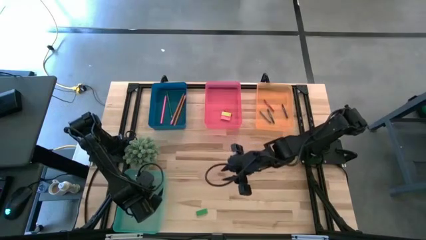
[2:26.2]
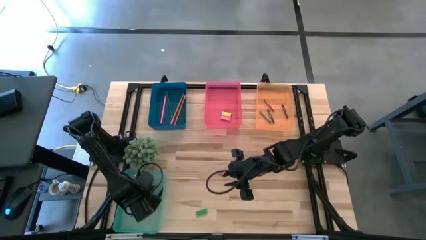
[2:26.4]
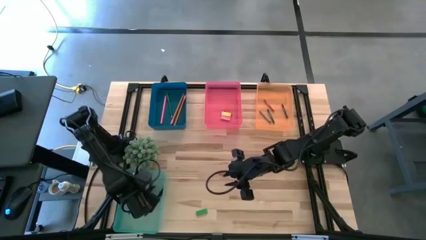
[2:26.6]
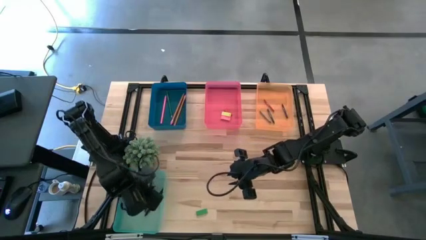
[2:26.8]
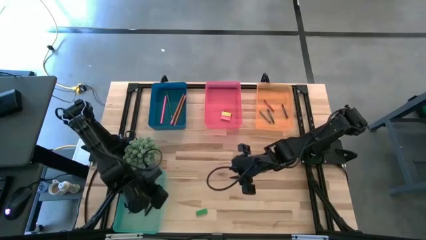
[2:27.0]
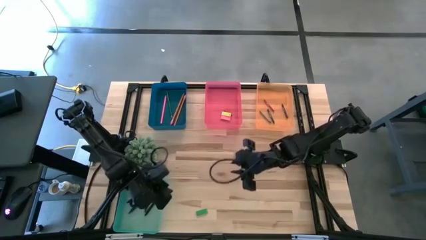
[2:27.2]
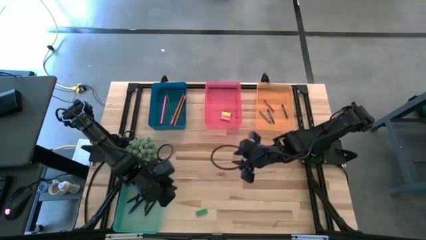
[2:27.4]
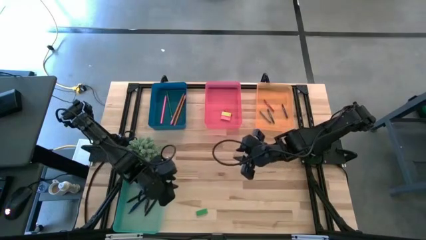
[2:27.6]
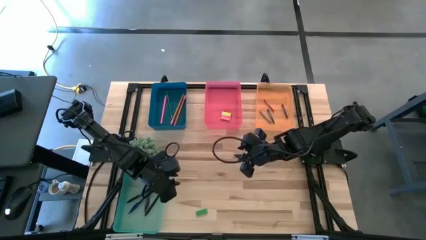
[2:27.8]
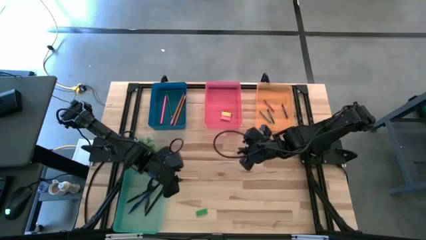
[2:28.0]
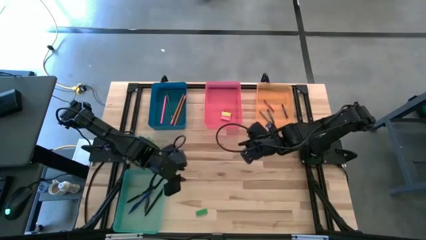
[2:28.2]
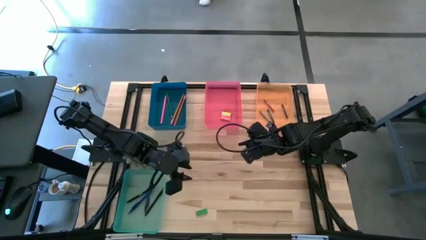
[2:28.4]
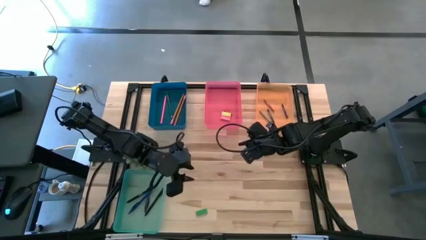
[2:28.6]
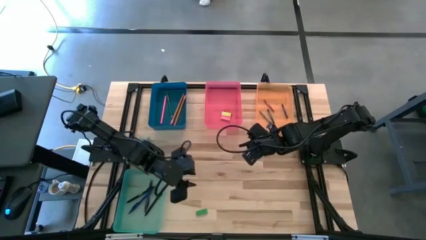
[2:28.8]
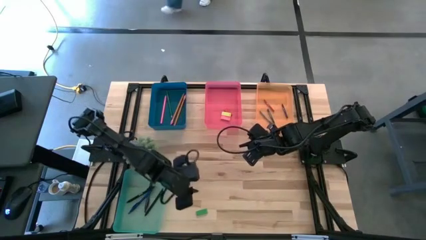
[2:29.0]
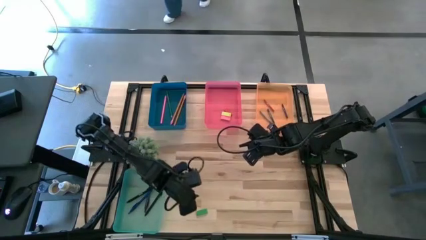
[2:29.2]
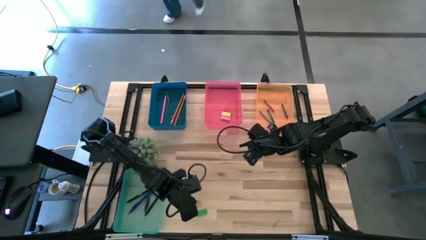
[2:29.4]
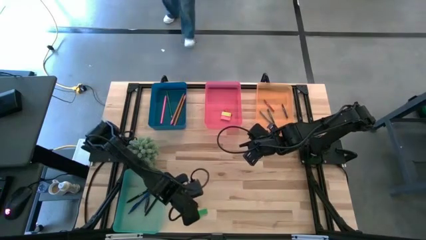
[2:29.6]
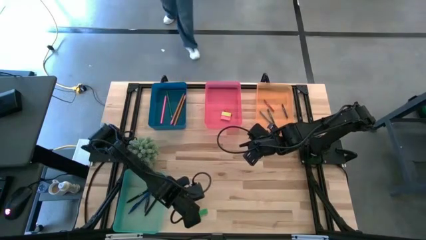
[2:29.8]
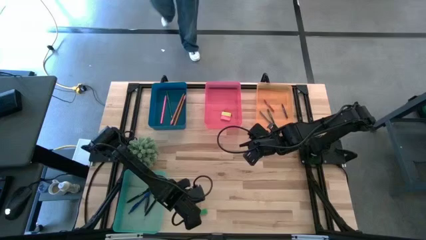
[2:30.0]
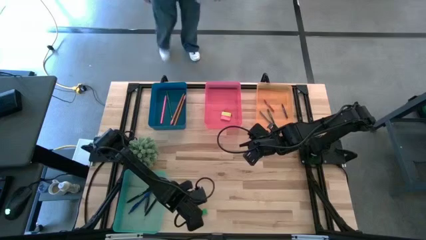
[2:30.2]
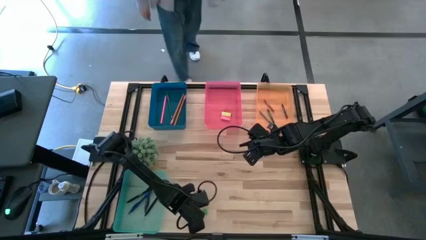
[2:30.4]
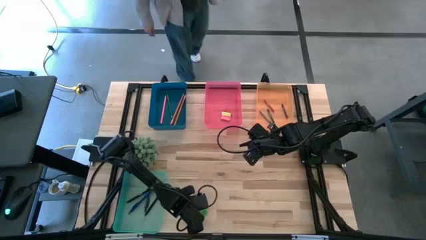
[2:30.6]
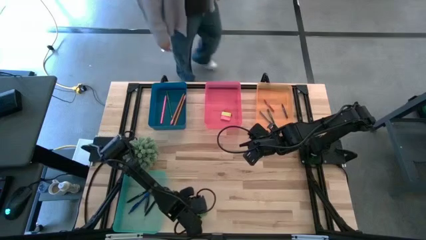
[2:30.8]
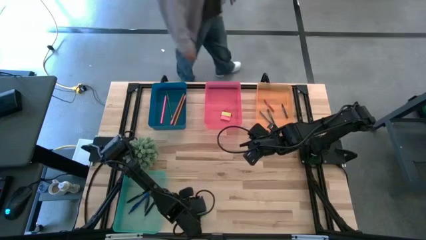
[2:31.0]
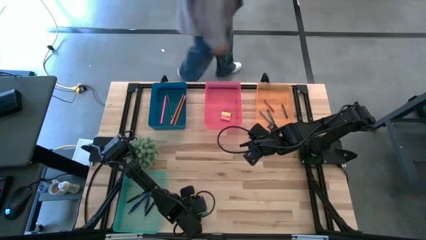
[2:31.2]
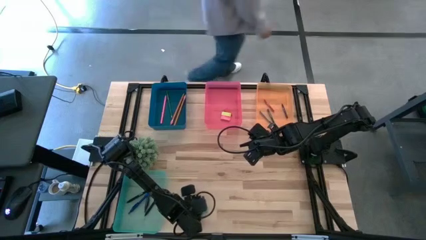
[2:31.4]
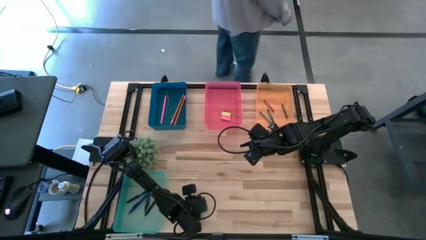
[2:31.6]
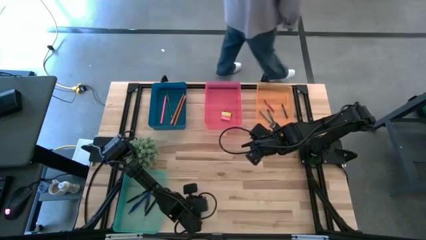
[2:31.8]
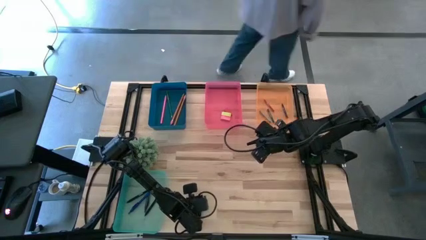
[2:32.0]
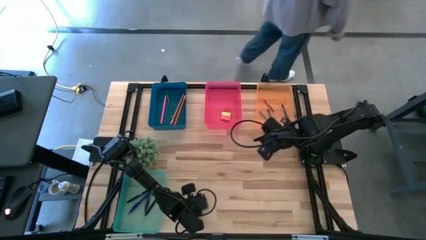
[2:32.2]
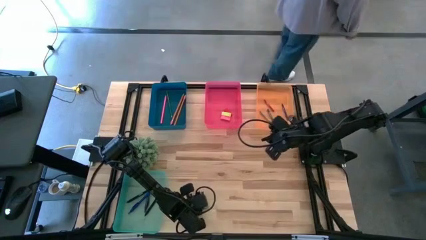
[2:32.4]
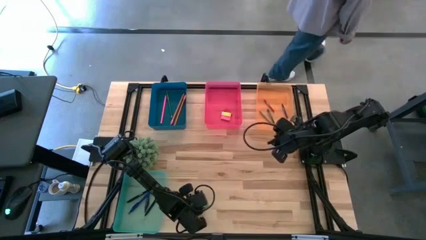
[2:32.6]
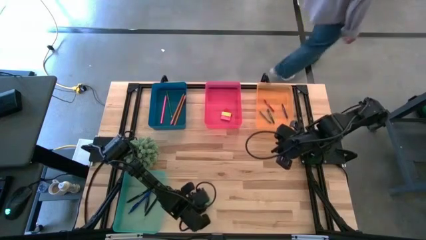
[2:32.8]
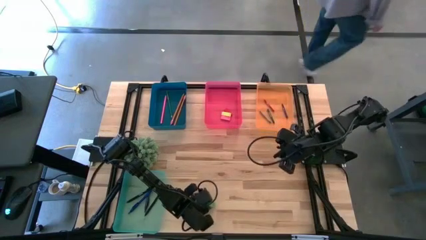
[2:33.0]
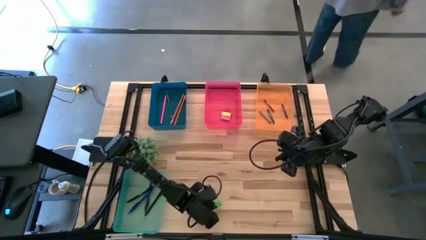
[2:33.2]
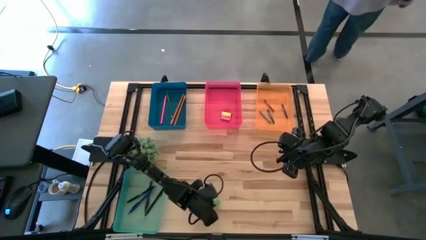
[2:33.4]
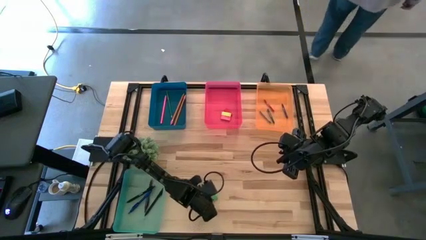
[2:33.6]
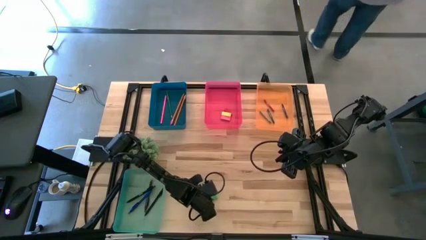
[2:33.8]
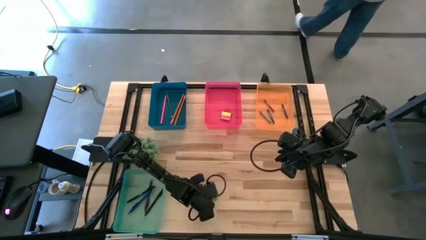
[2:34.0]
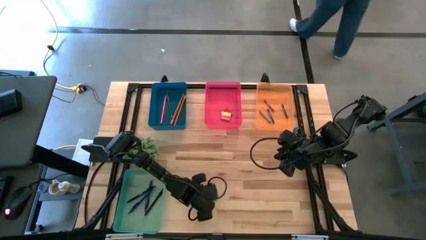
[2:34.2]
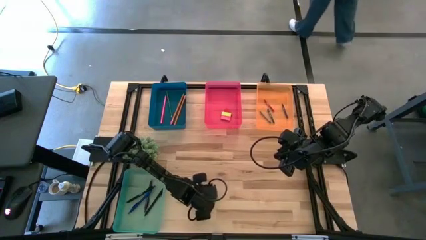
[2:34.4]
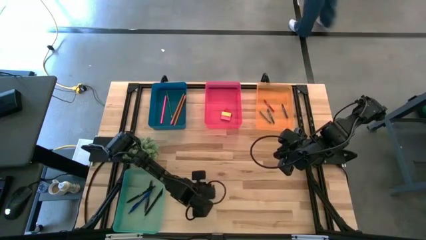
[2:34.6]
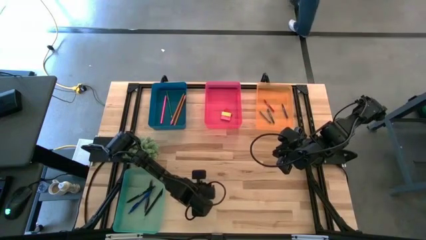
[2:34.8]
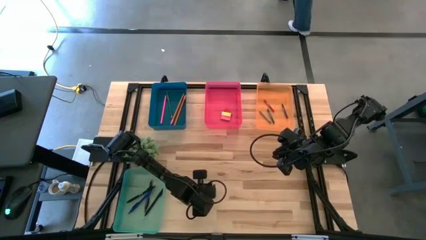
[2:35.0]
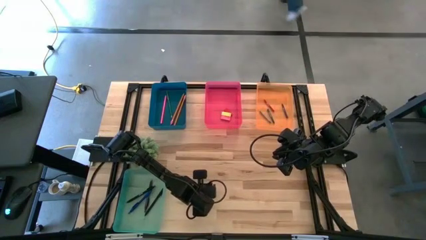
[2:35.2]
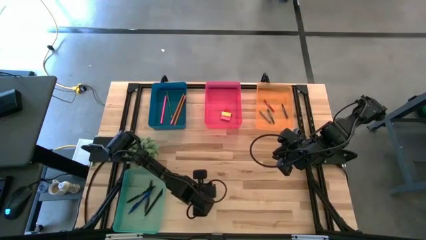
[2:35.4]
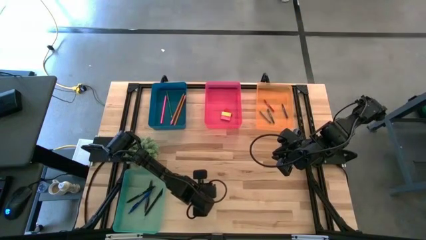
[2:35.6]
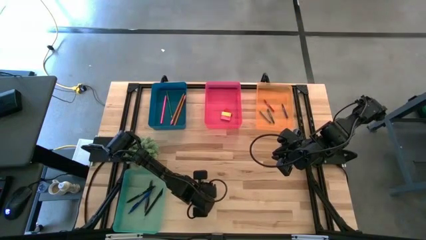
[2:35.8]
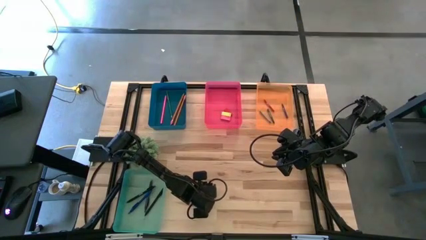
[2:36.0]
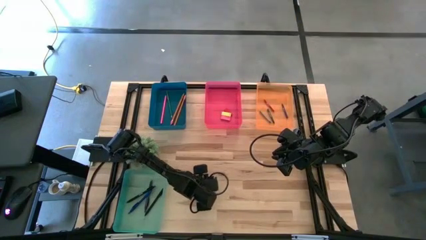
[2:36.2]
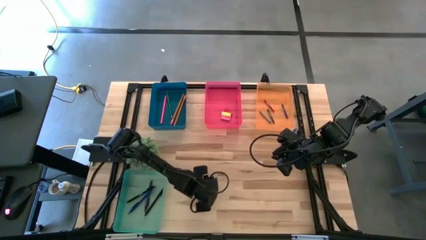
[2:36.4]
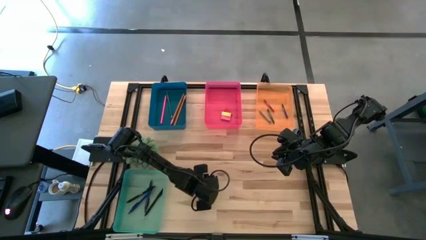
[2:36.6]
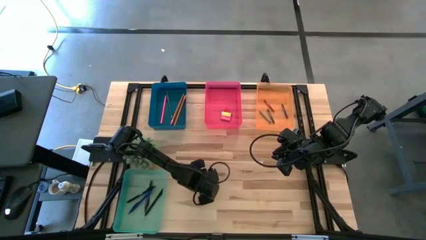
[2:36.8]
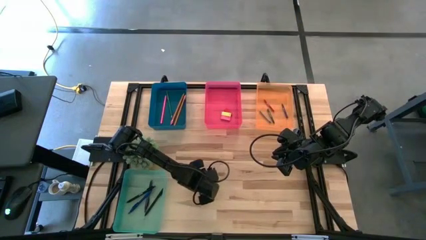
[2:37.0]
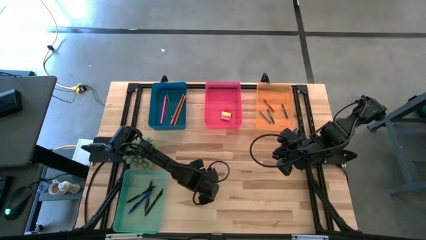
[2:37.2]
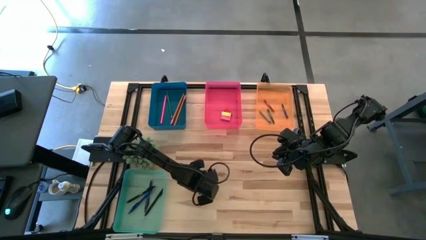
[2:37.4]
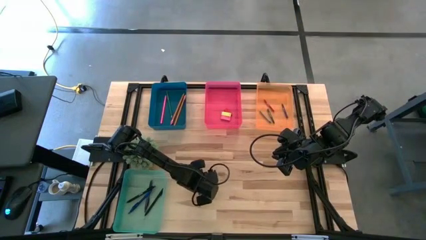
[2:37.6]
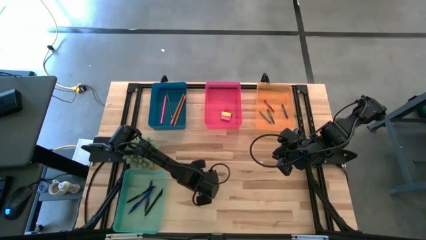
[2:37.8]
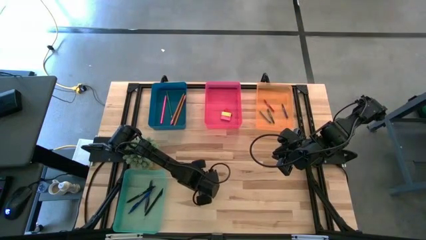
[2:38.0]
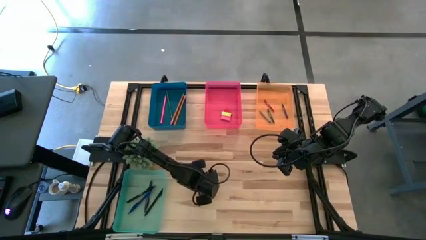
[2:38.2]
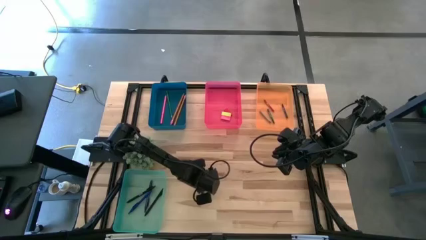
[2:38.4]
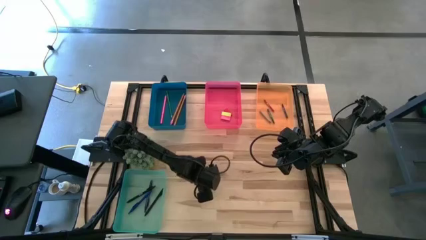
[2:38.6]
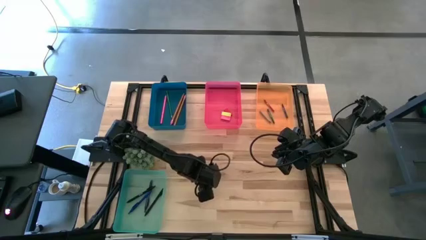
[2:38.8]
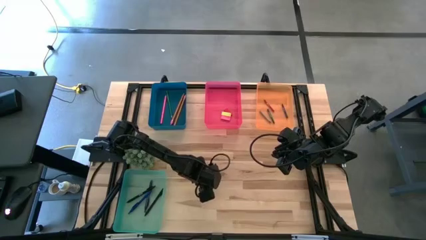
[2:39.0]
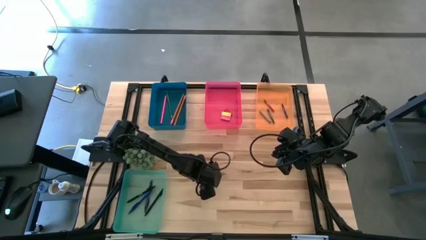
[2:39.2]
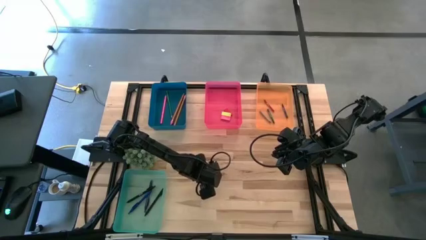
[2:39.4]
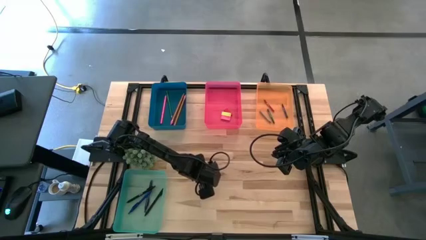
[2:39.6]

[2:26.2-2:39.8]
Task: Sort crayons/erasers/pens/pencils in bins
Put the green eraser into the pink bin

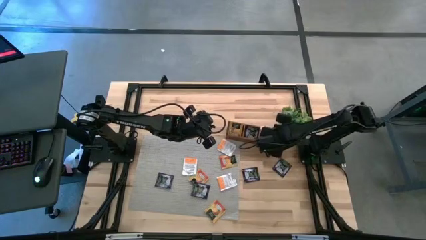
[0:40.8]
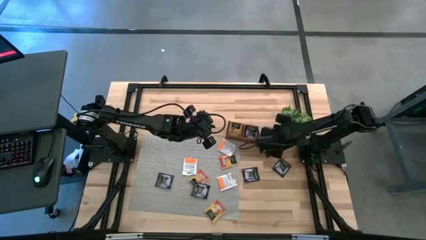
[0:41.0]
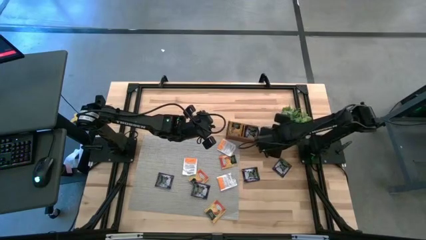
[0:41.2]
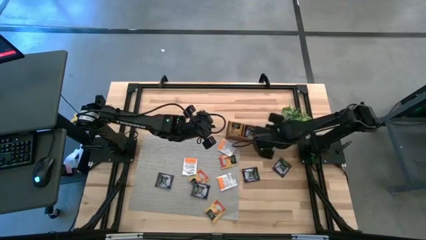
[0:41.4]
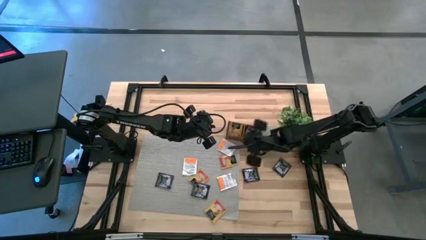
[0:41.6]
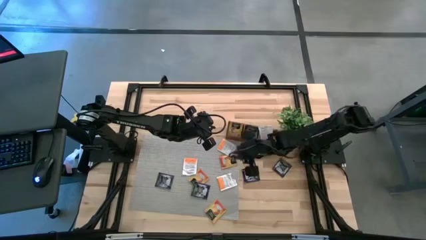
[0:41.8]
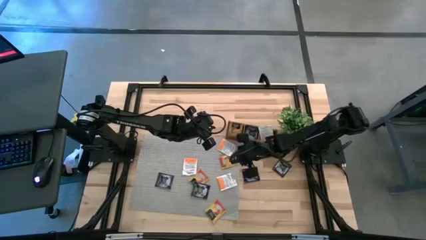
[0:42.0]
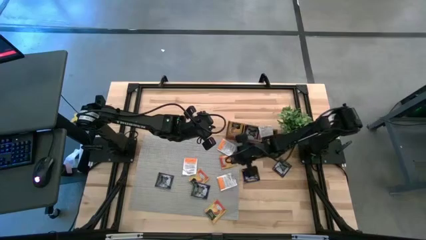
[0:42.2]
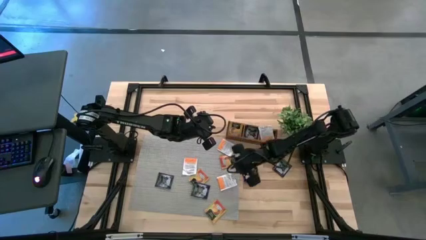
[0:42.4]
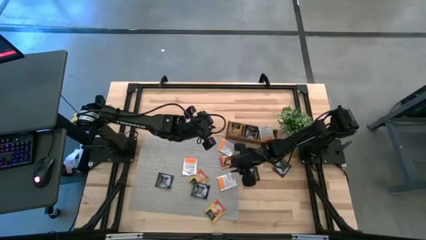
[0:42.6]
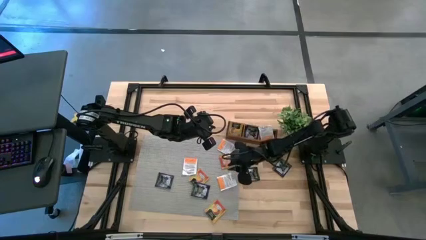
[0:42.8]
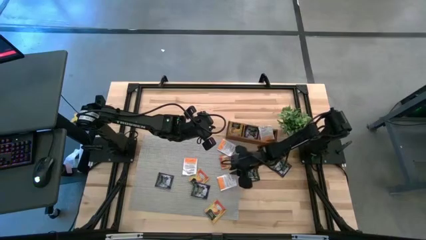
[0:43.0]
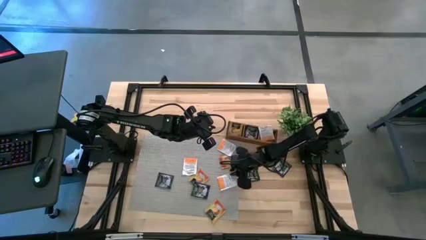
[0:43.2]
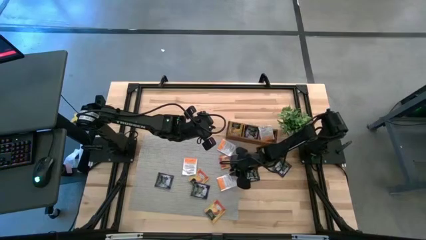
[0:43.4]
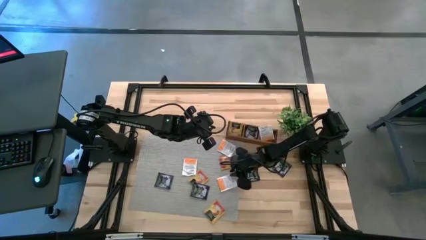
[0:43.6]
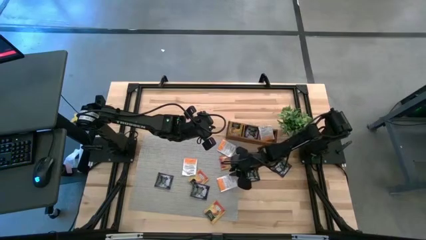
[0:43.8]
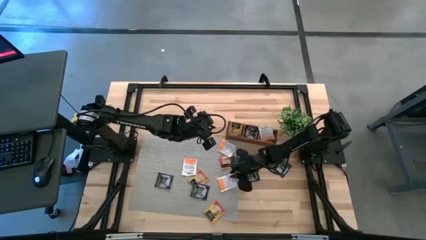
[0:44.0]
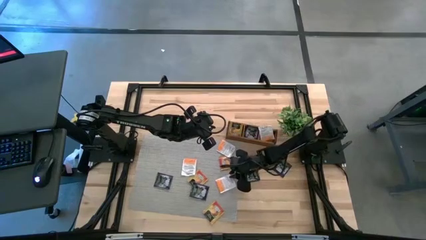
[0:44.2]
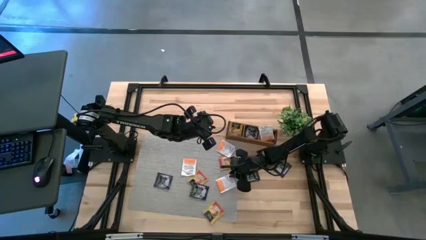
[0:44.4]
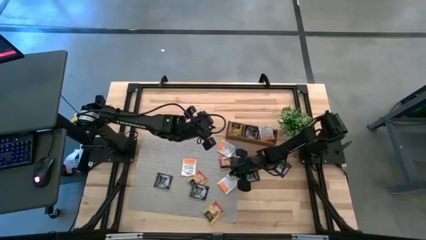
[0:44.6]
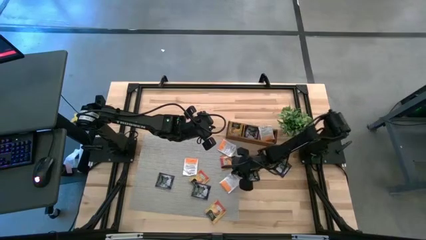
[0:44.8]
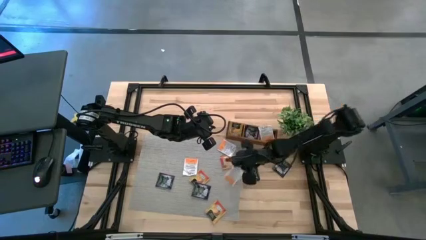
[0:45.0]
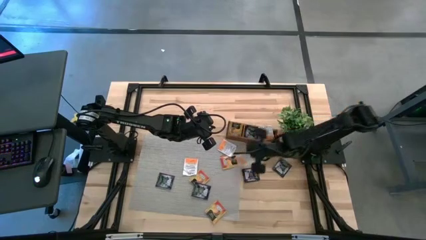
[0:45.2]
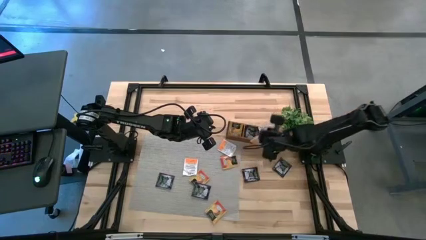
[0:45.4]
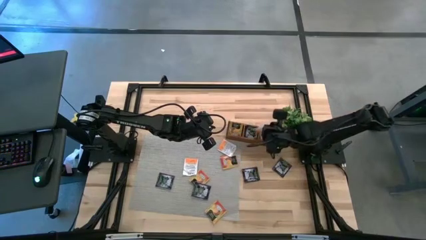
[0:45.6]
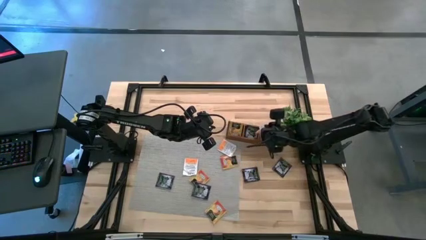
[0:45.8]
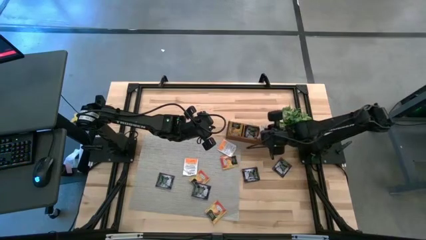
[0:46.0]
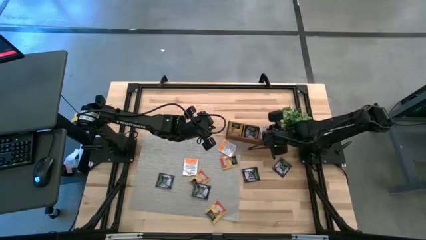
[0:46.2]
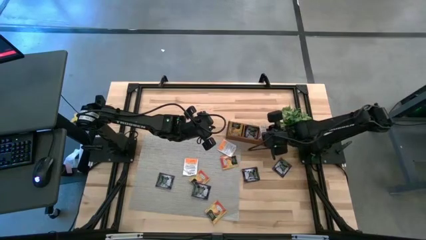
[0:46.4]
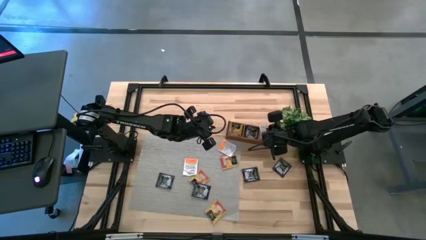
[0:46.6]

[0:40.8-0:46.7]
Task: Pick & Place Tea
Put the white orange tea bag in the right section of the wooden organizer
